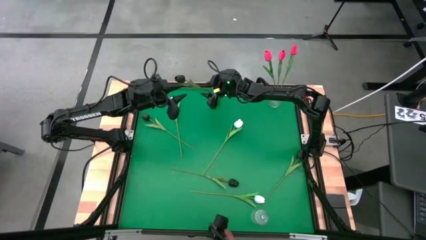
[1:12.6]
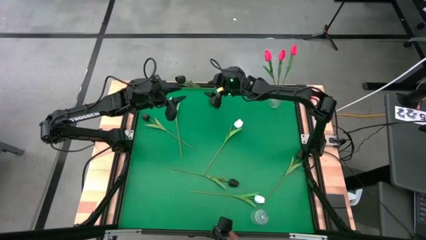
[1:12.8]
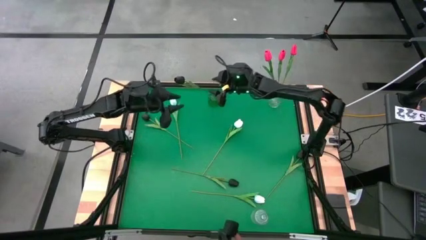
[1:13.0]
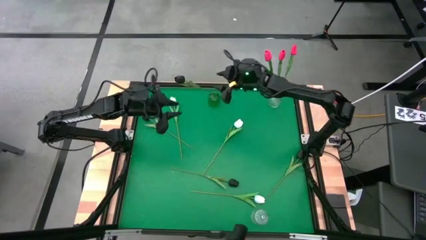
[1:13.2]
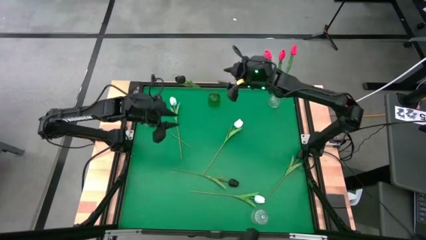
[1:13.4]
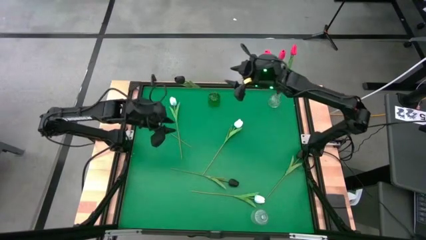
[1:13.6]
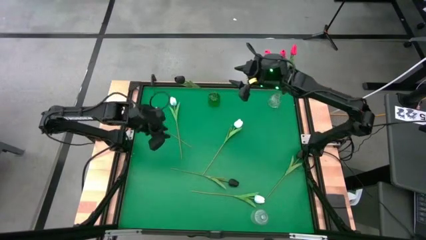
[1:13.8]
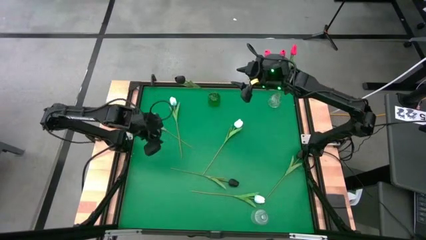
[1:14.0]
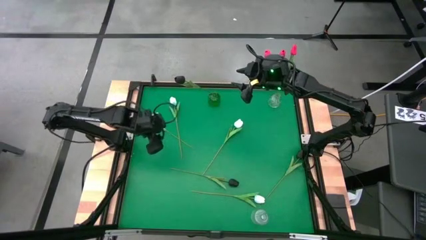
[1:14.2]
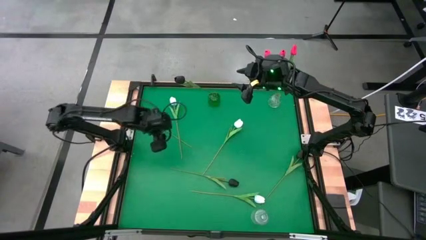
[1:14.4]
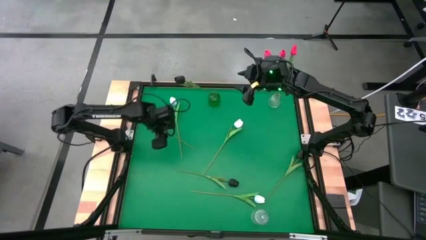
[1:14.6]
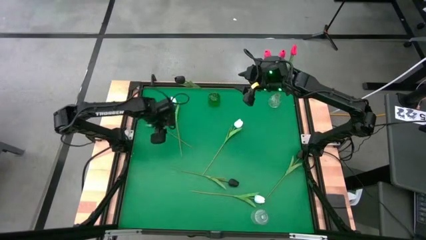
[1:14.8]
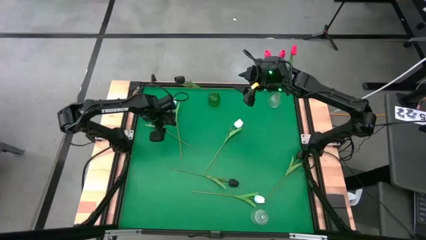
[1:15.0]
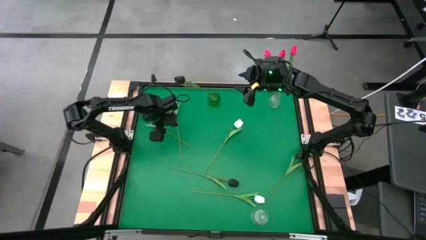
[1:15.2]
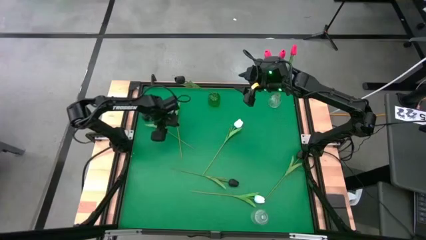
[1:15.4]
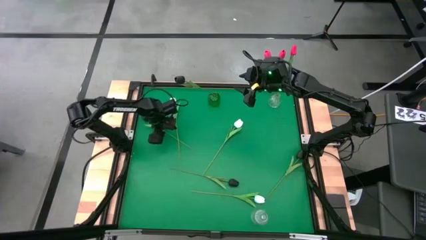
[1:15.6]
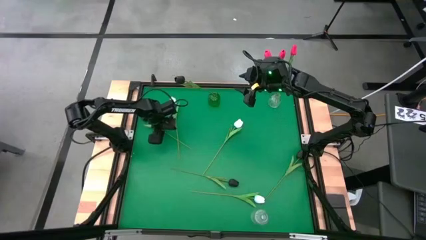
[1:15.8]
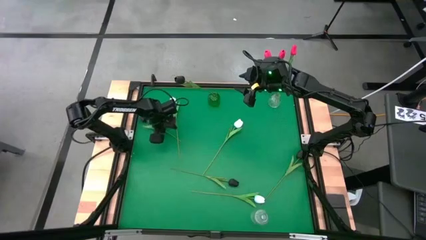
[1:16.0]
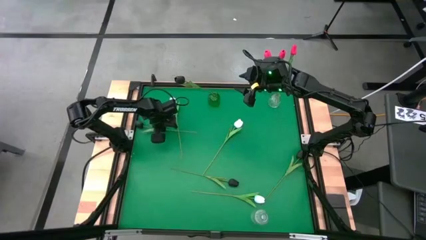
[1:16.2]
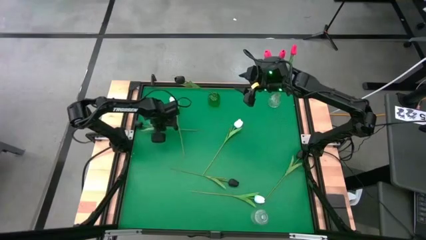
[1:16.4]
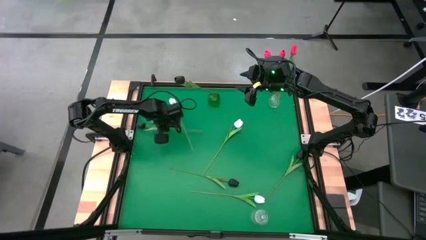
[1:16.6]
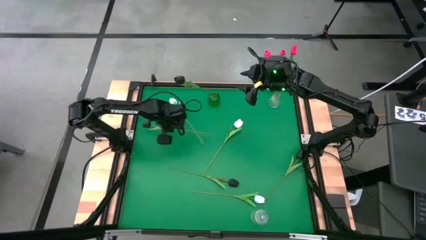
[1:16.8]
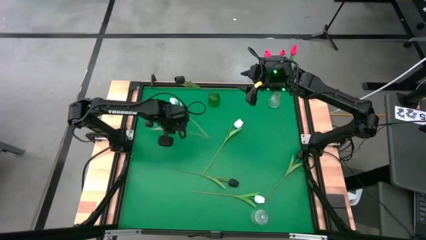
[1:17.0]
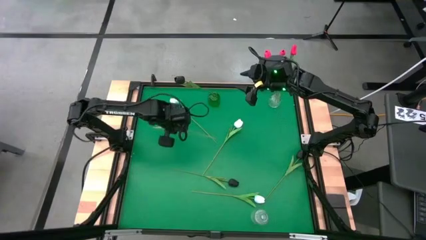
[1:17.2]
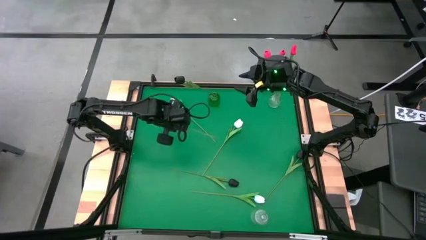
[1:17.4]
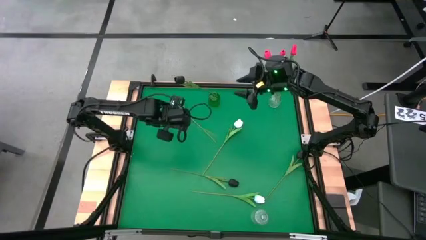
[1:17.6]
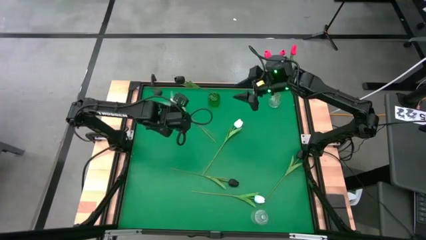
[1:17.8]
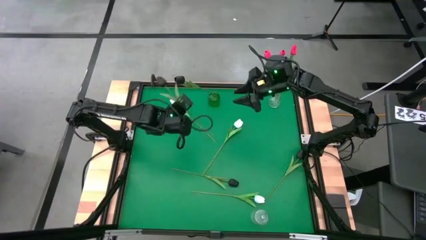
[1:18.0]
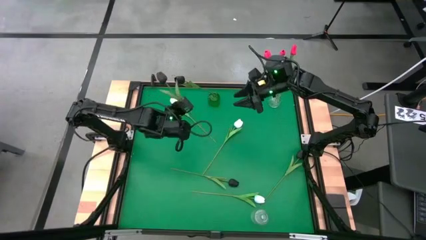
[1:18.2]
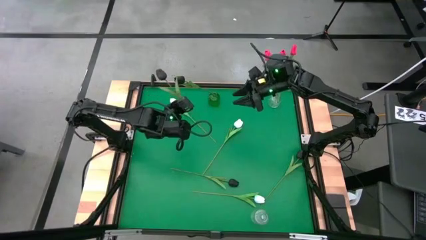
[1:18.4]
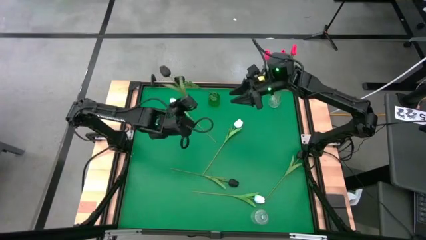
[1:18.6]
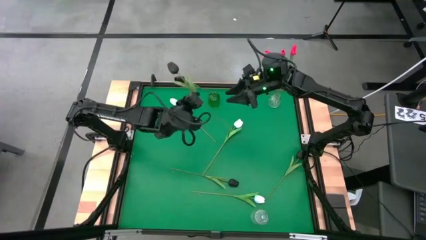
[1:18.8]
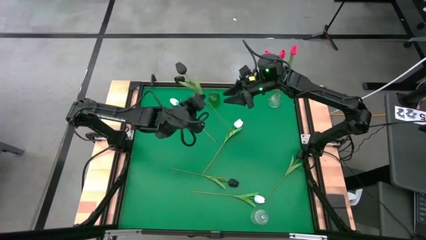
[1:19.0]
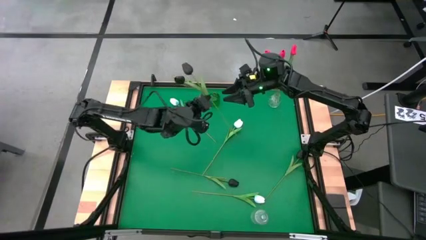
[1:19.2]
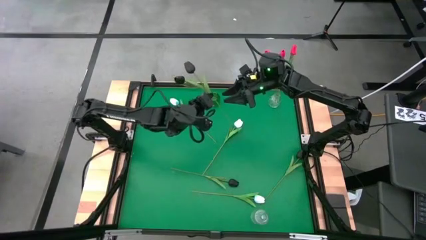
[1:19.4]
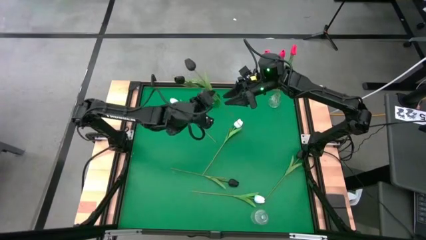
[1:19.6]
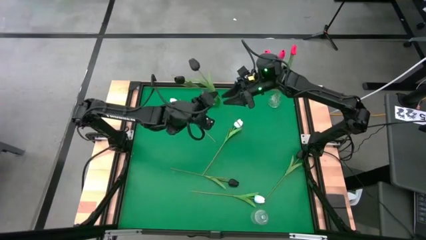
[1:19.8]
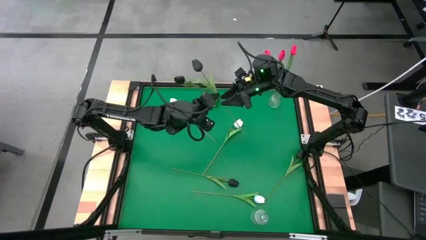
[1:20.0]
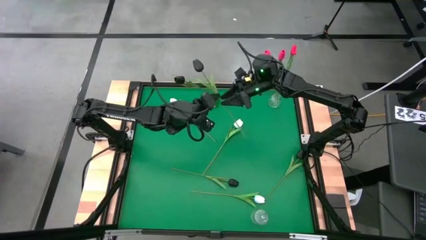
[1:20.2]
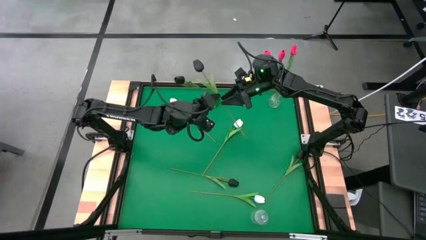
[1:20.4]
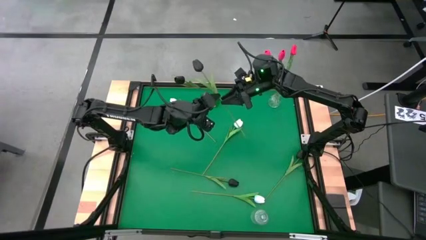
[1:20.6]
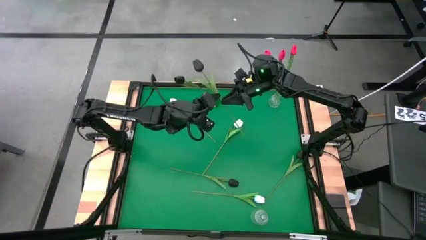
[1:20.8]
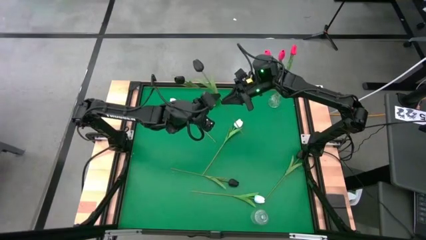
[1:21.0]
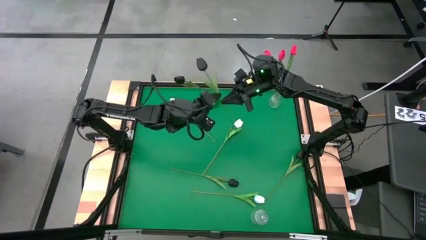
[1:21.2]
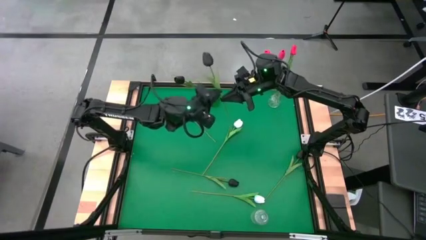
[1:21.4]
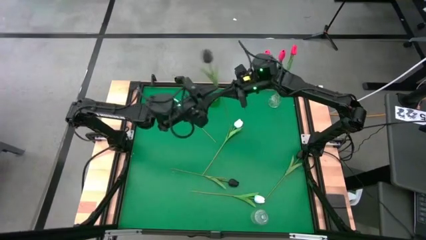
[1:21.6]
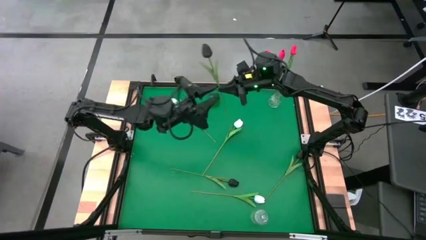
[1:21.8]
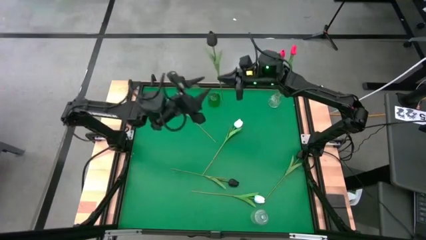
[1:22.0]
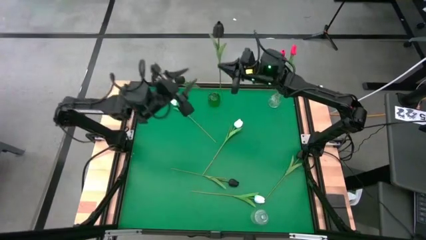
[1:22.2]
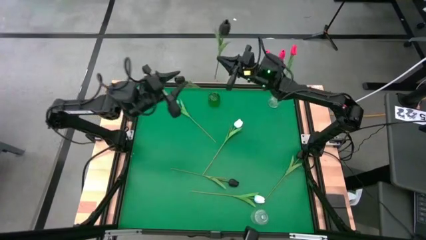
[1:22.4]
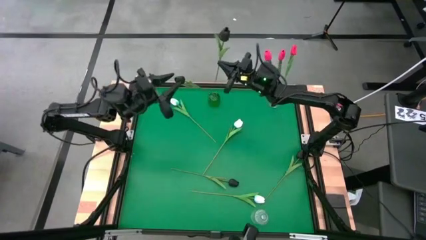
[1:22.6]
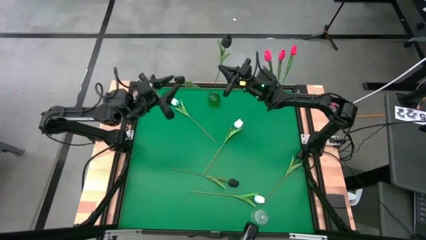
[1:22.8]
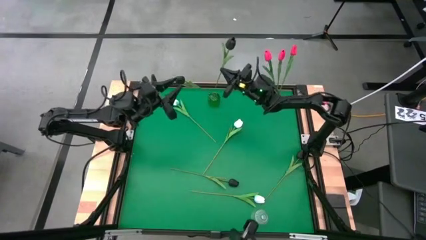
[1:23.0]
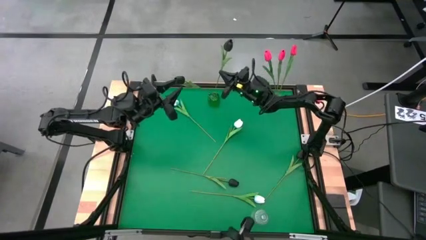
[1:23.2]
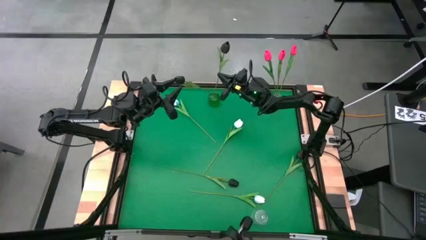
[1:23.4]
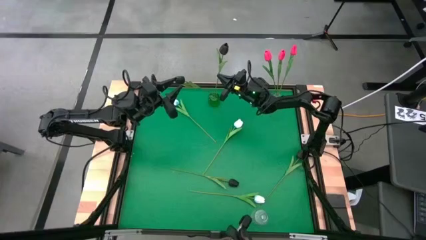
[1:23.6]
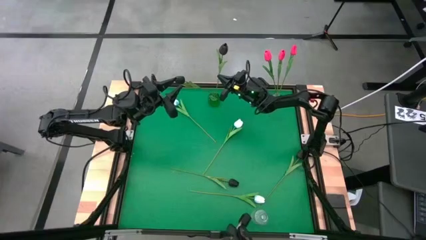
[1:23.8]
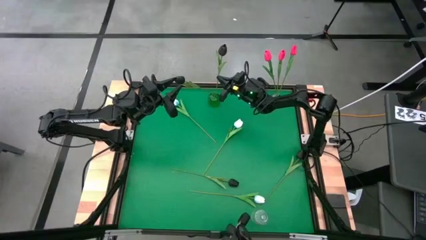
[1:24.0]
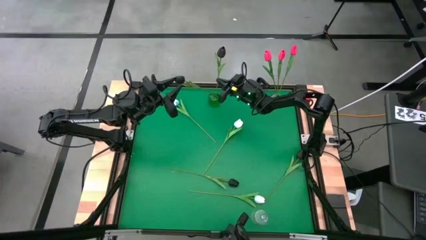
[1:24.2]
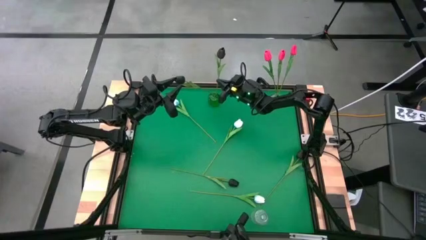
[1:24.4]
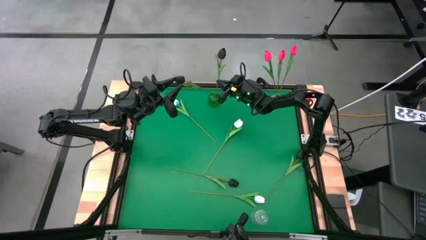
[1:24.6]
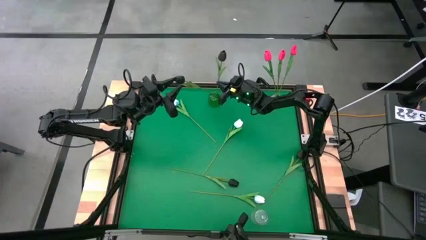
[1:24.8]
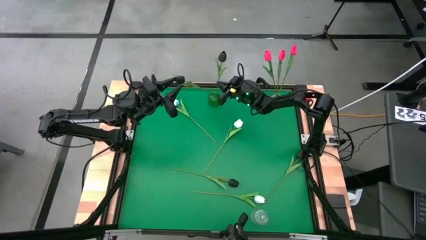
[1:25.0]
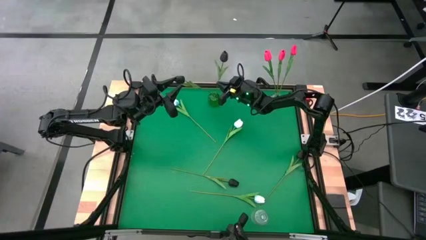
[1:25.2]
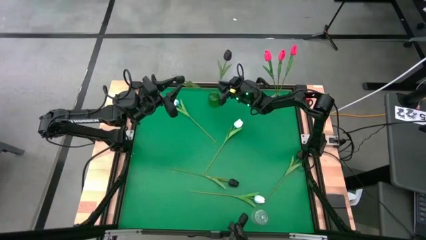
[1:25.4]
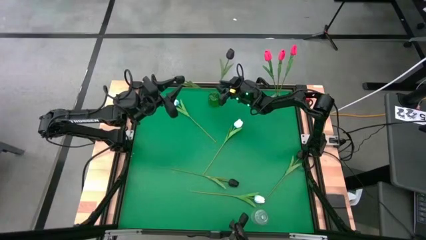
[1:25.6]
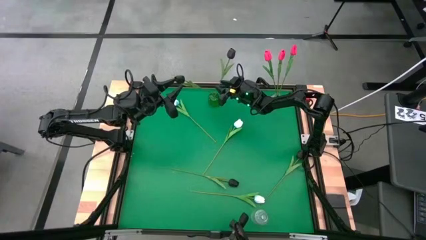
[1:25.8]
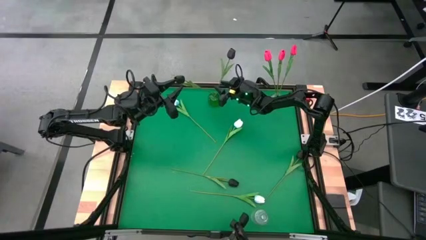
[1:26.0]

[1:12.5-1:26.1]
Task: Sort flowers into vase by color
Put the black tulip into the green vase

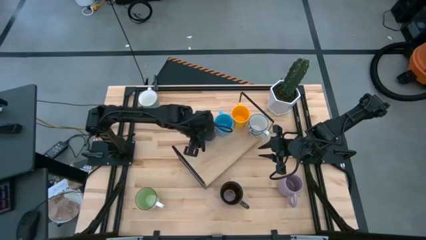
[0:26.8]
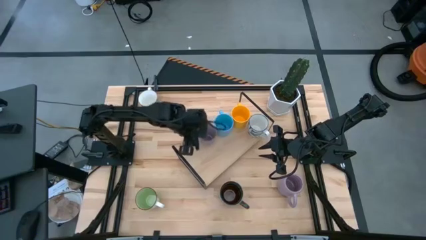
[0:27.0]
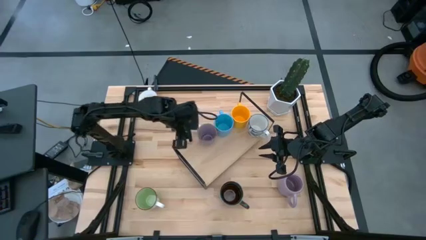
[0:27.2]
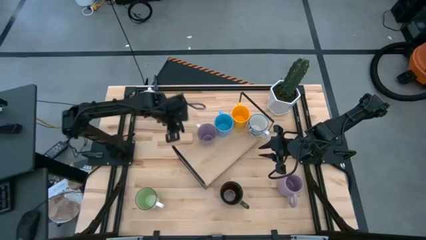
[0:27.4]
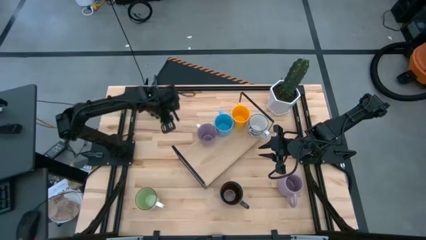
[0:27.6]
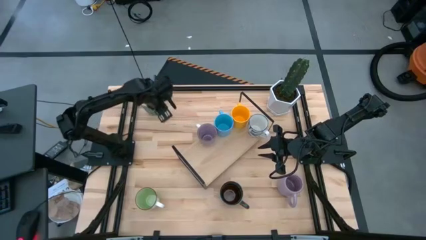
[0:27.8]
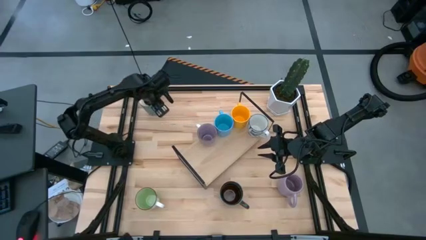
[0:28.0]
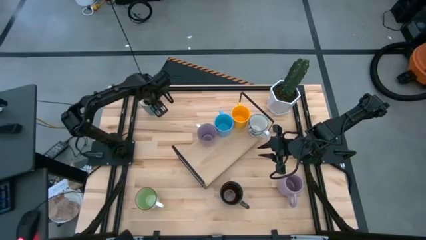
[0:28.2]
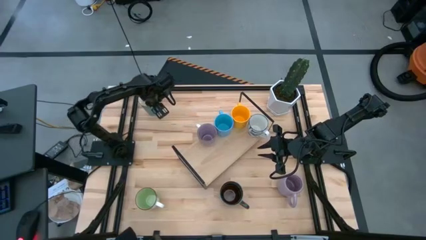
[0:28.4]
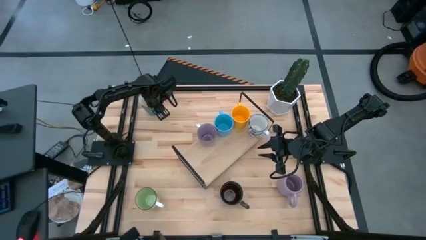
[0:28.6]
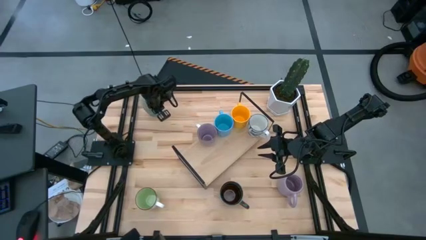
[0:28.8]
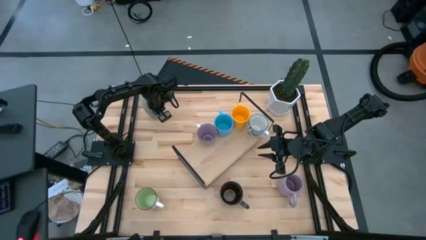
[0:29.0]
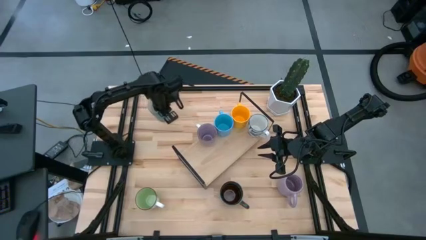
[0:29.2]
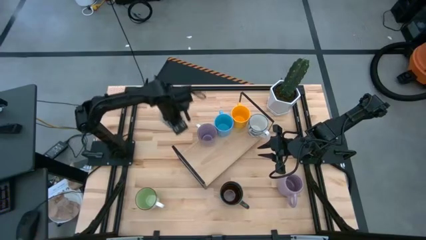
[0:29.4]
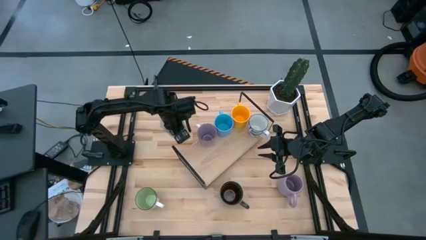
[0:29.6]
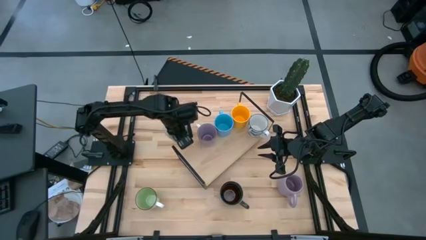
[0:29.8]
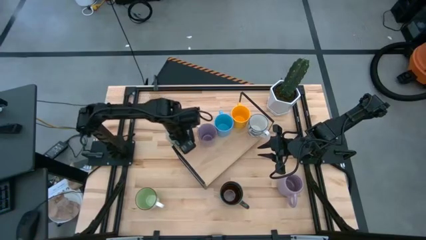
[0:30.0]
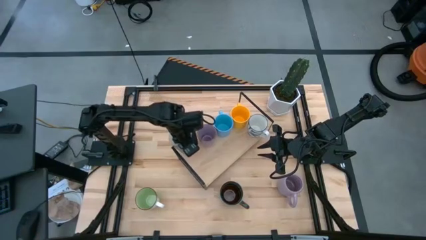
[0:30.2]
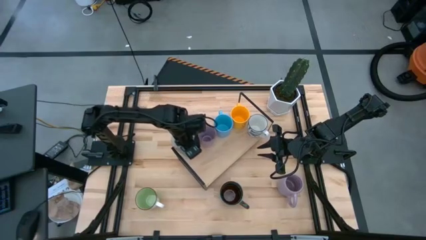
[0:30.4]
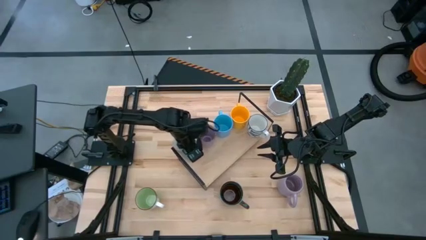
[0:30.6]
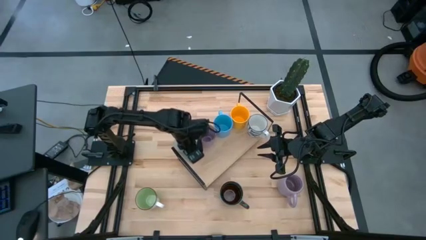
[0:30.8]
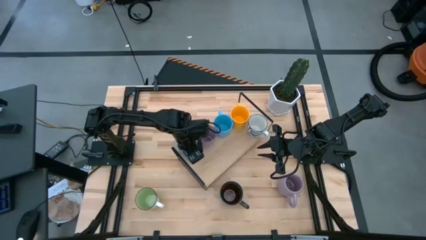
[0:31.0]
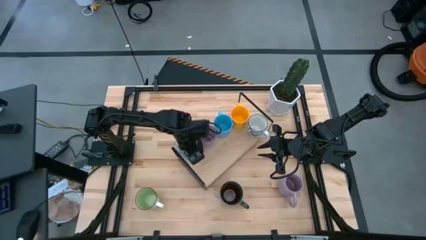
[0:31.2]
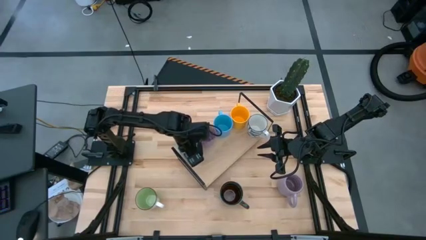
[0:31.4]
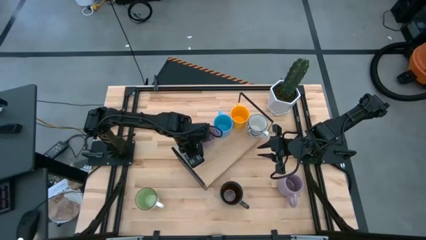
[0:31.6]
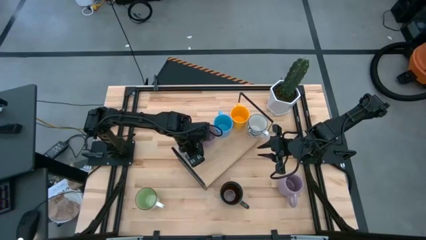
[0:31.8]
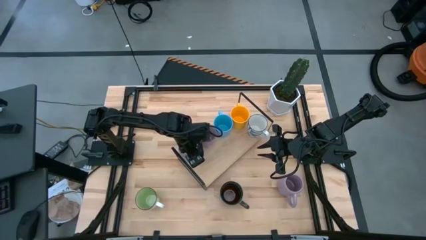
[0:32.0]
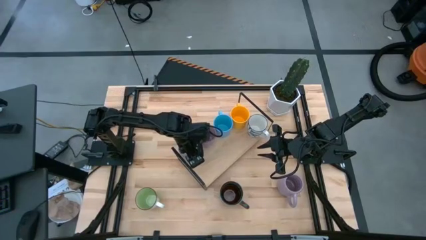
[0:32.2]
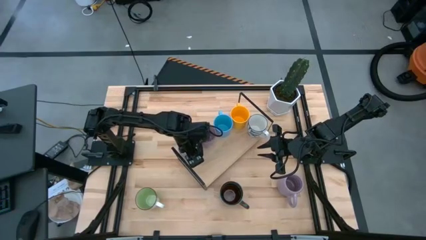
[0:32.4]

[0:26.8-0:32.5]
Task: Place coffee mugs
Put the dark green mug onto the shelf
